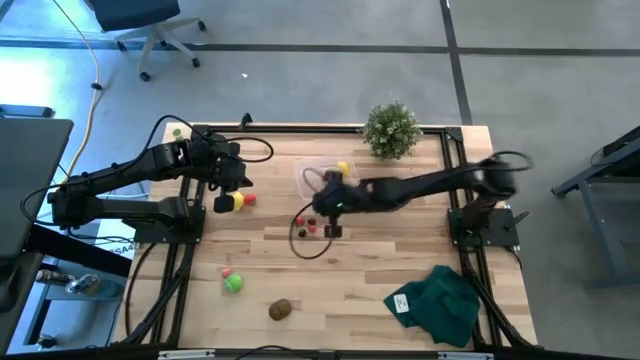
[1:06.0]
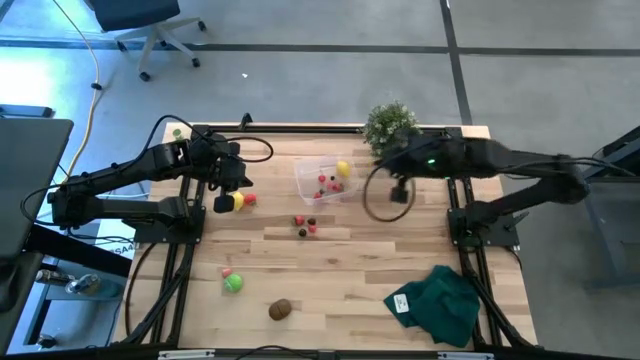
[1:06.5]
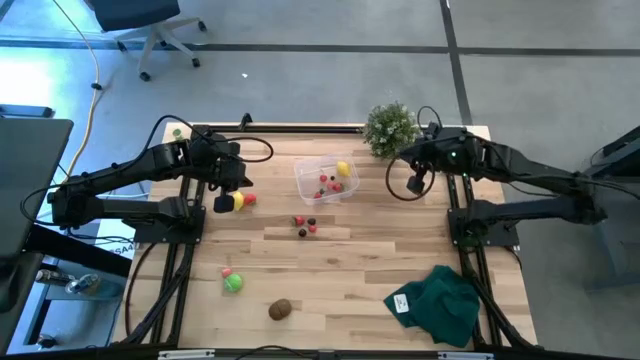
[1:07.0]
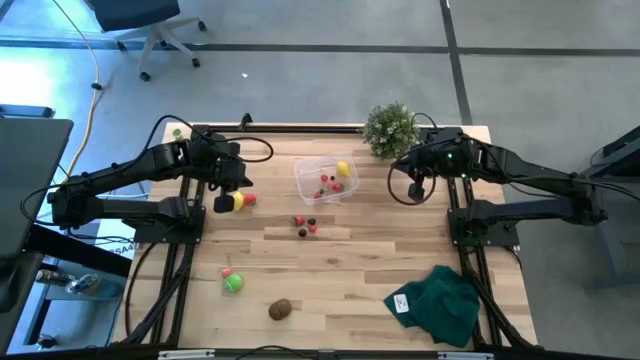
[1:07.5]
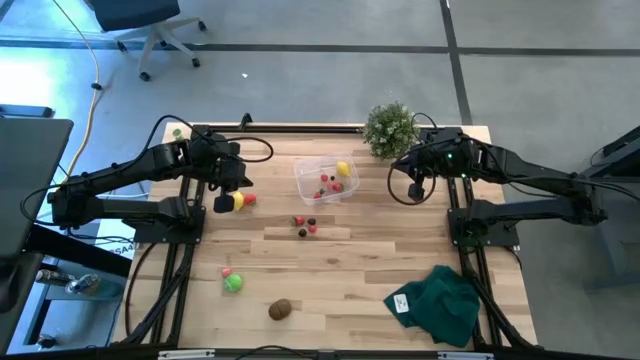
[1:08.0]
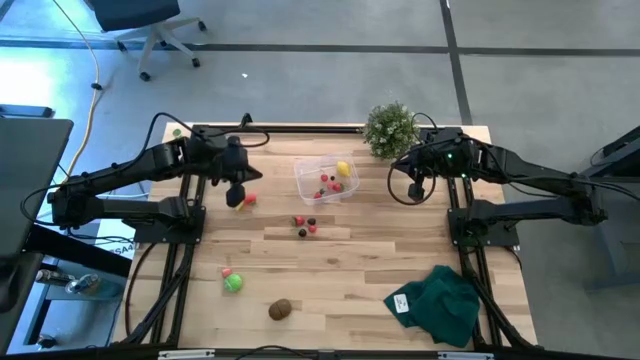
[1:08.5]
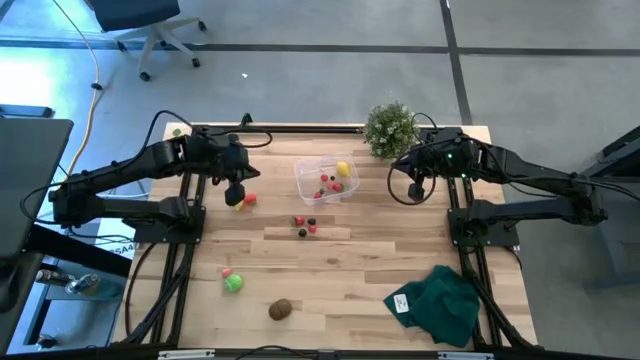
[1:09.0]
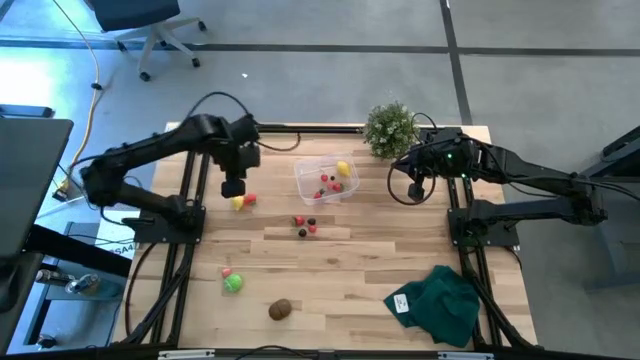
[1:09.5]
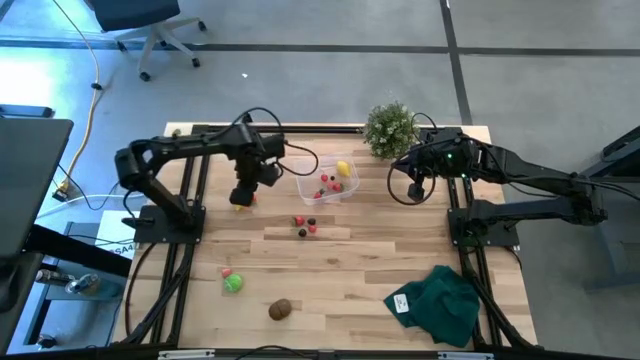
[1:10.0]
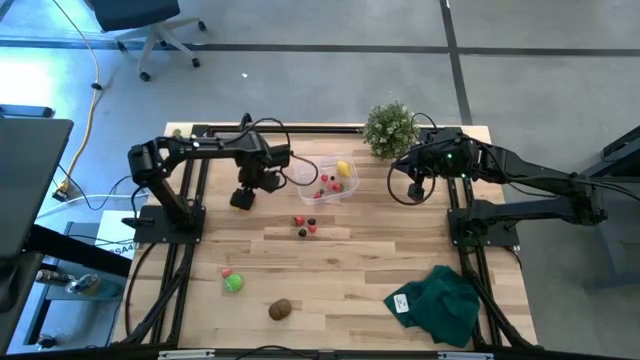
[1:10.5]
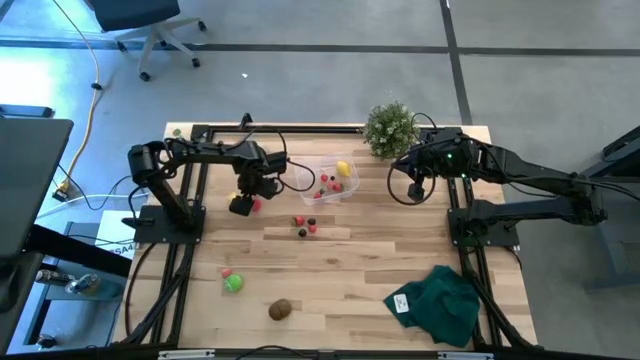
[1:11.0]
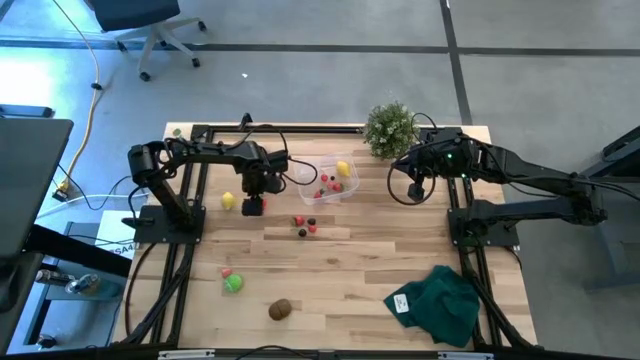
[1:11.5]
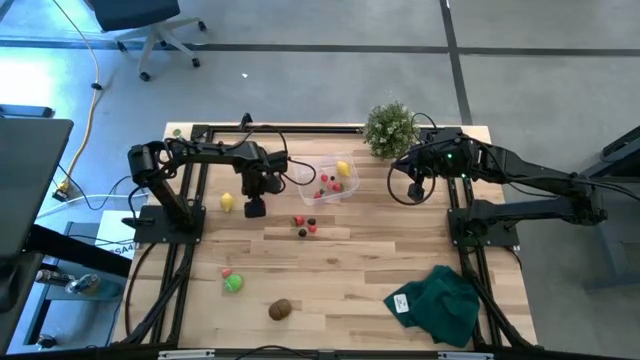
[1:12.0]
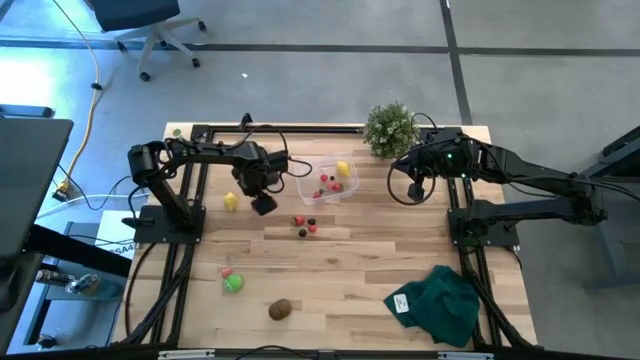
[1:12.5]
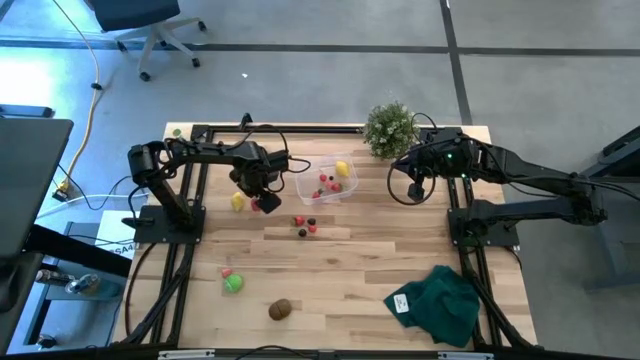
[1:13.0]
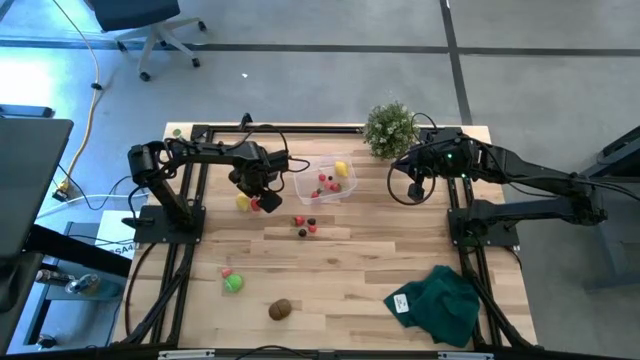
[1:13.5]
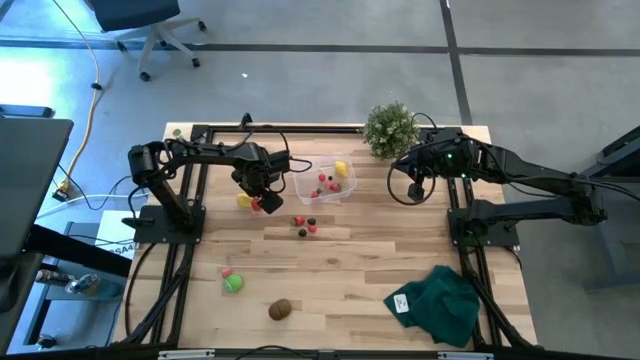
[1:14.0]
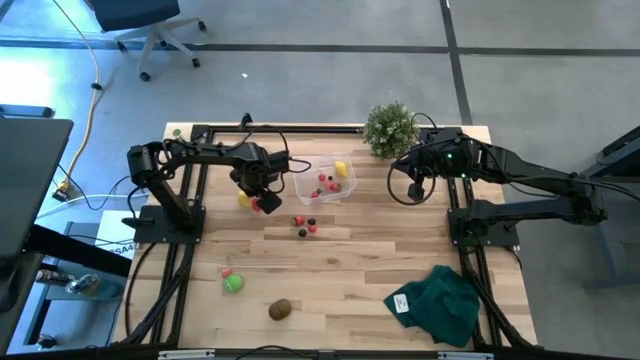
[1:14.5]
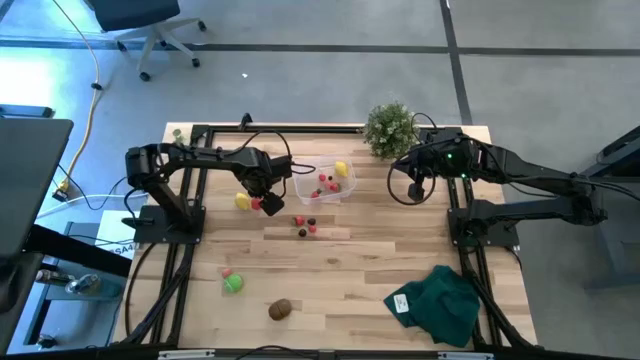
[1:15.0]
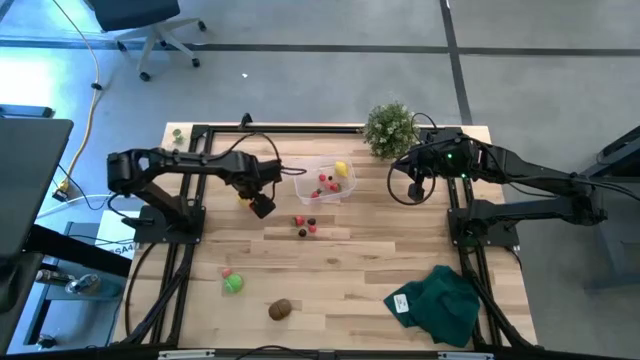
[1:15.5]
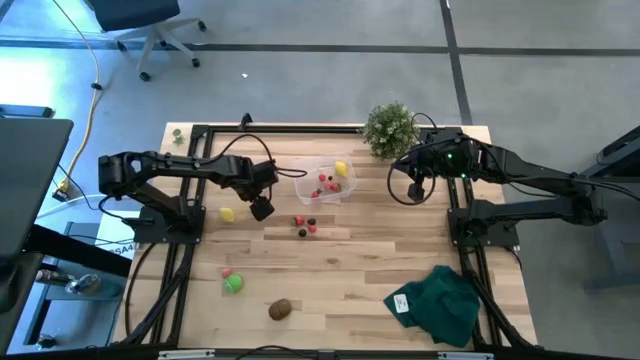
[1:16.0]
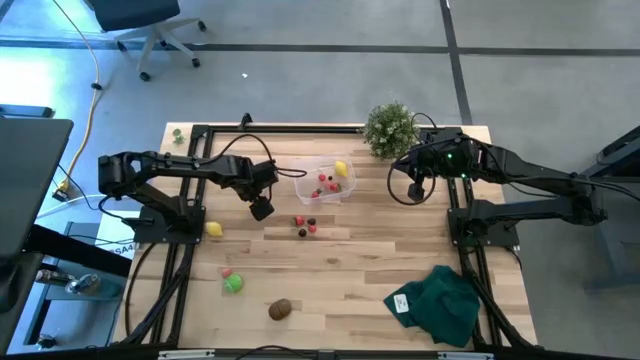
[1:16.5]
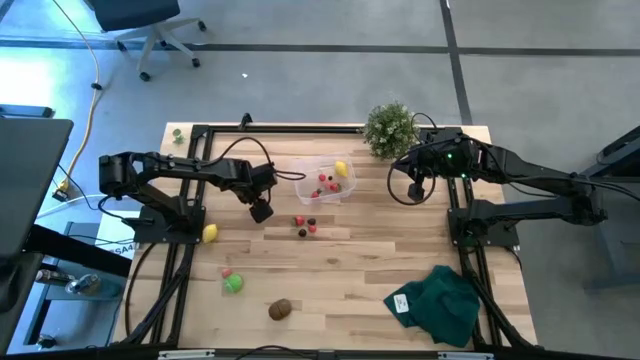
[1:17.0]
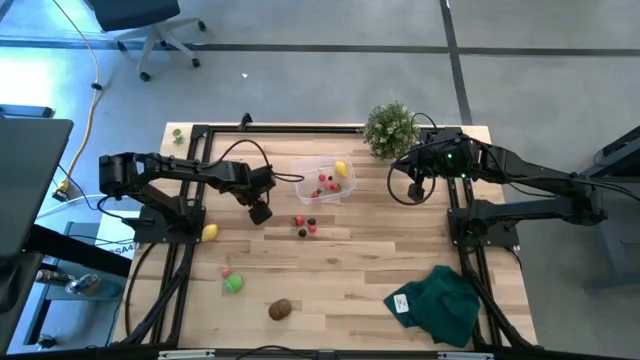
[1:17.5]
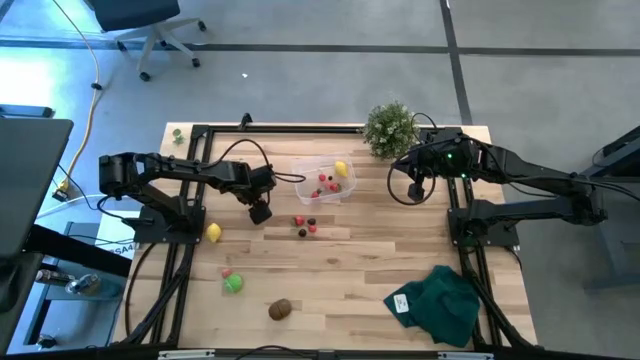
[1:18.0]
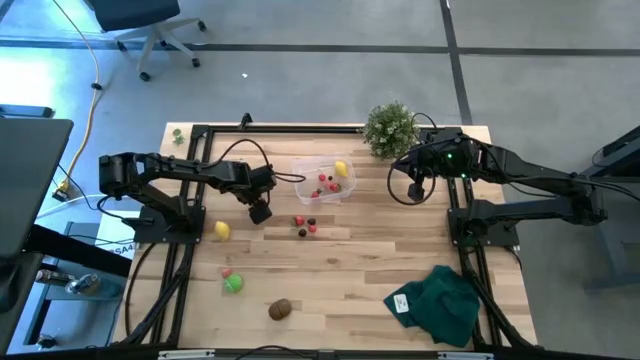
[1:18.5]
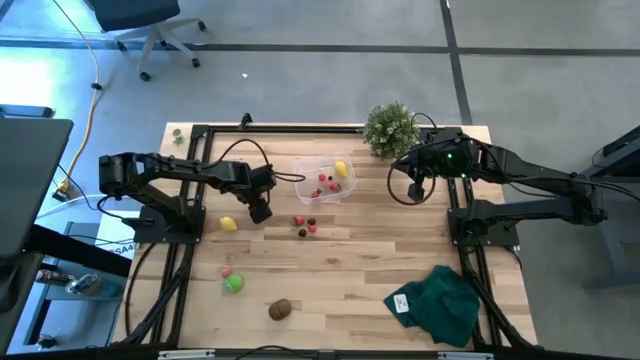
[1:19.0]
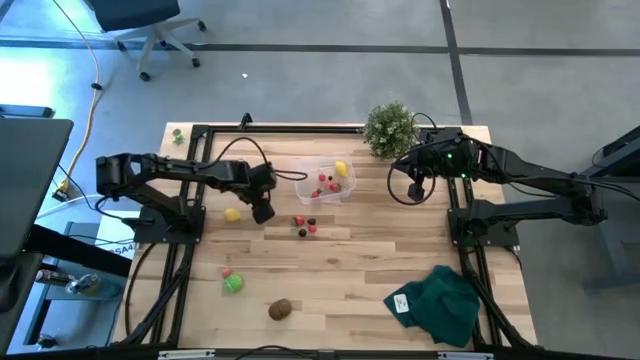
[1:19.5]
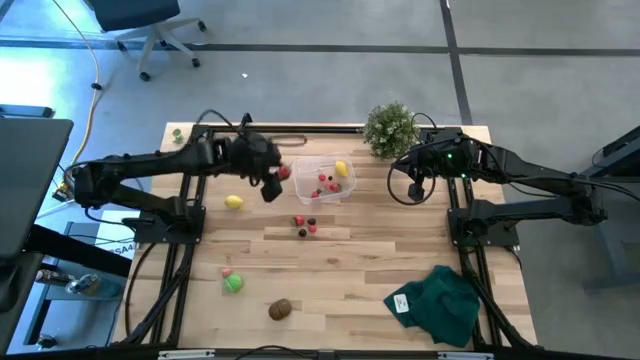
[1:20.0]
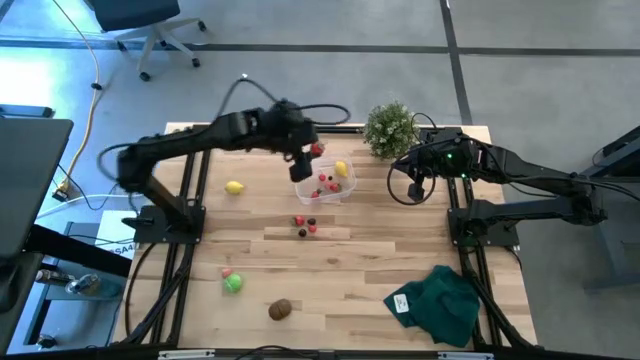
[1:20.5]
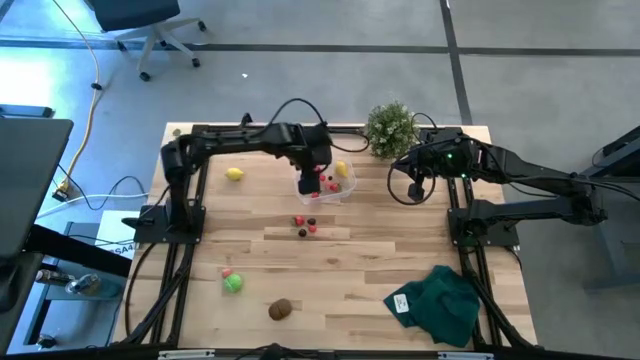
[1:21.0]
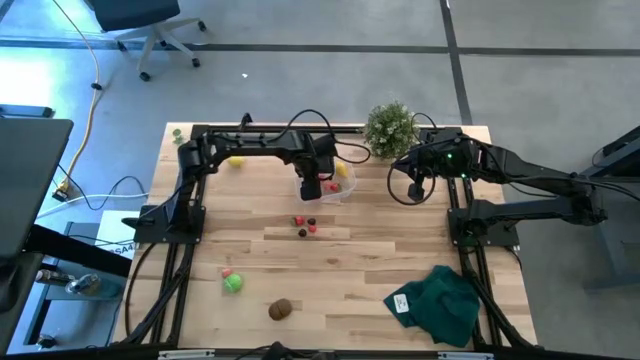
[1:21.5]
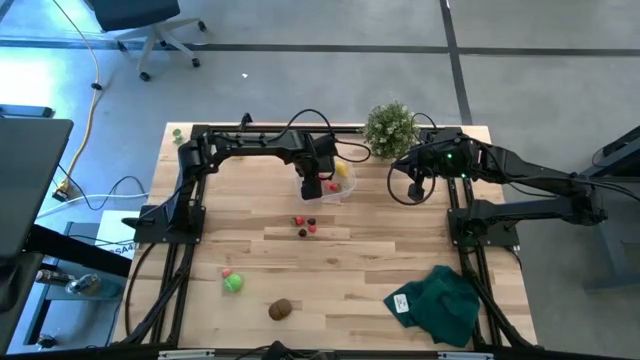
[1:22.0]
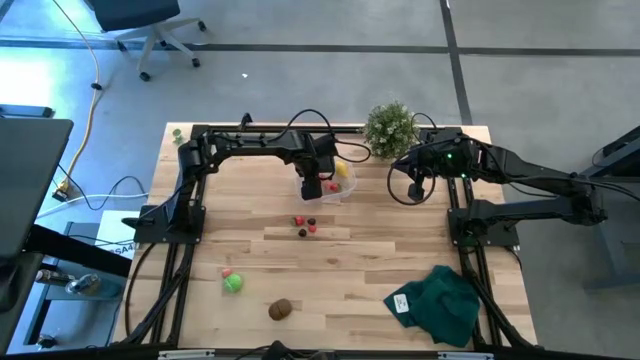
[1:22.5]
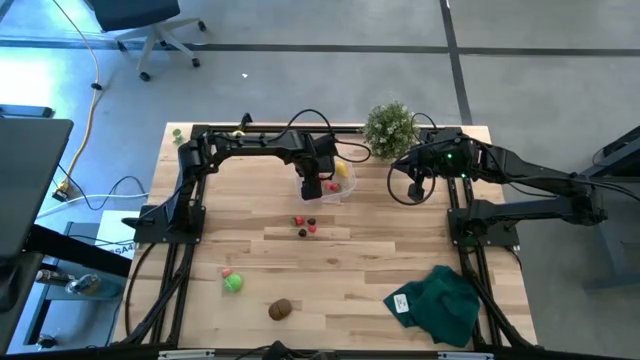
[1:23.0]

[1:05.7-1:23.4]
Task: Pick and placing Produce into tupperware
Put the red strawberry into the transparent bin

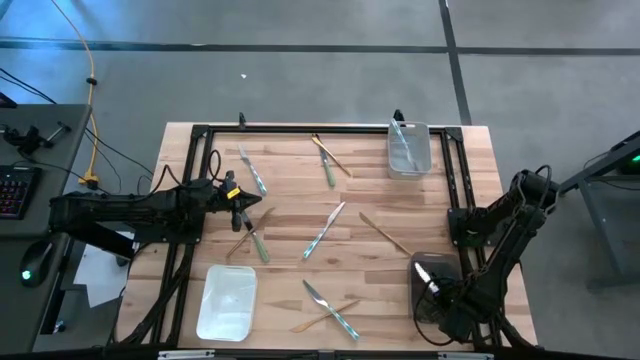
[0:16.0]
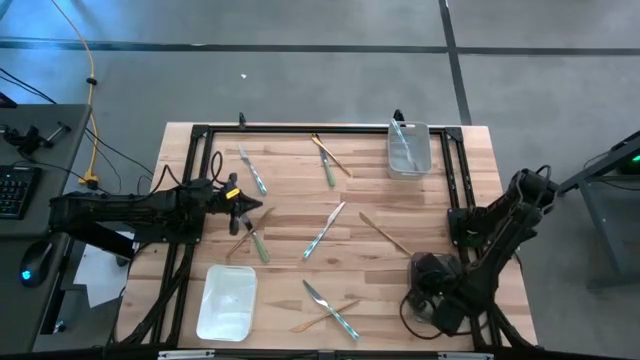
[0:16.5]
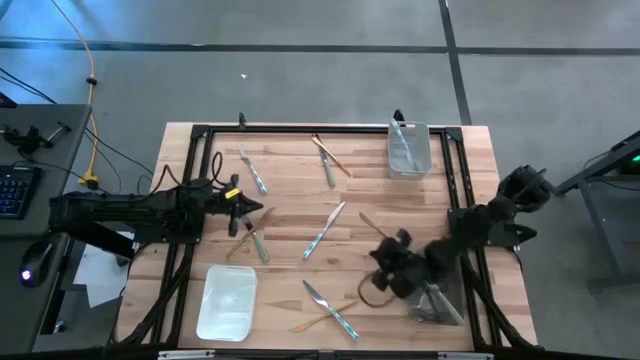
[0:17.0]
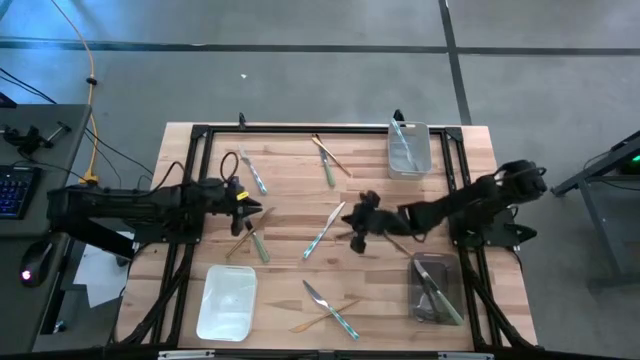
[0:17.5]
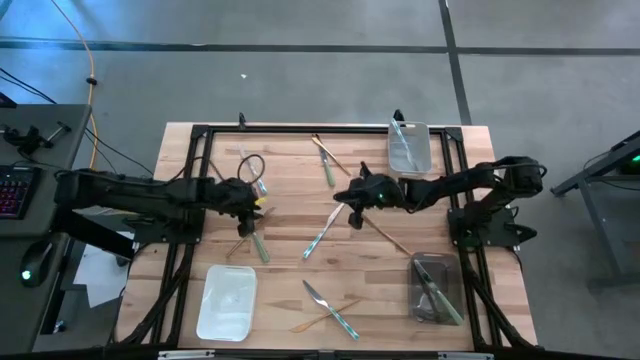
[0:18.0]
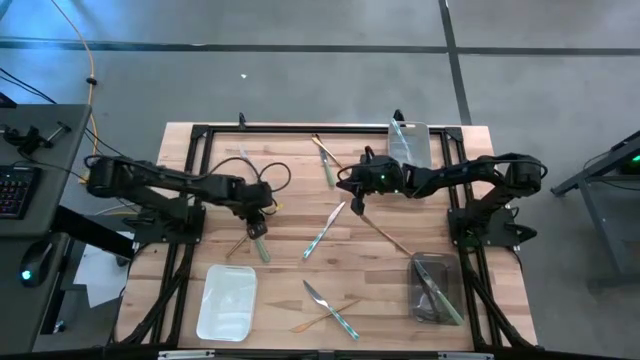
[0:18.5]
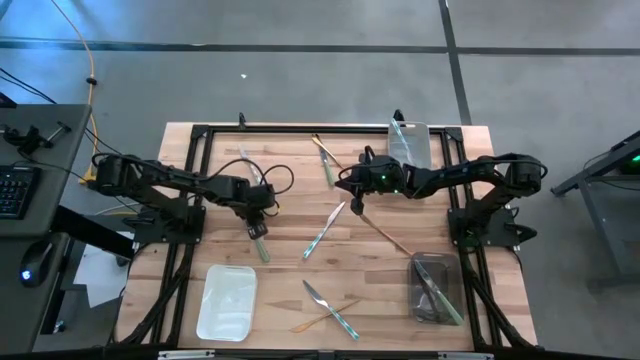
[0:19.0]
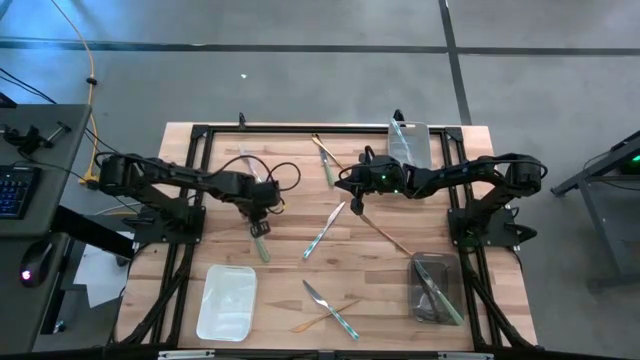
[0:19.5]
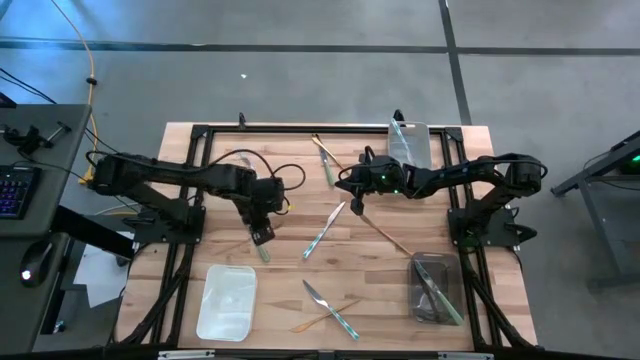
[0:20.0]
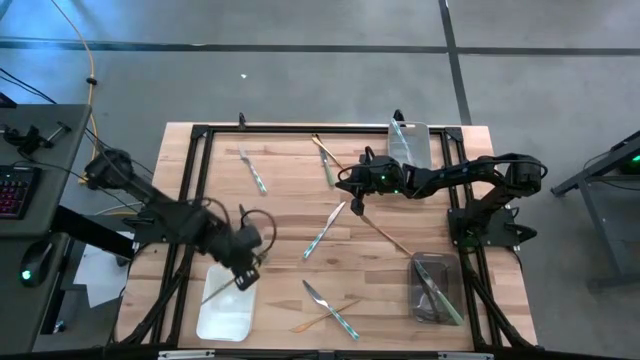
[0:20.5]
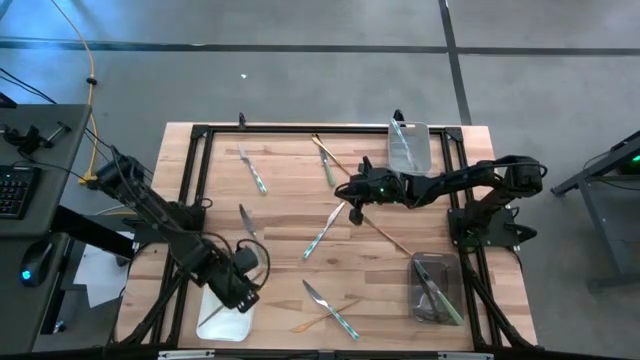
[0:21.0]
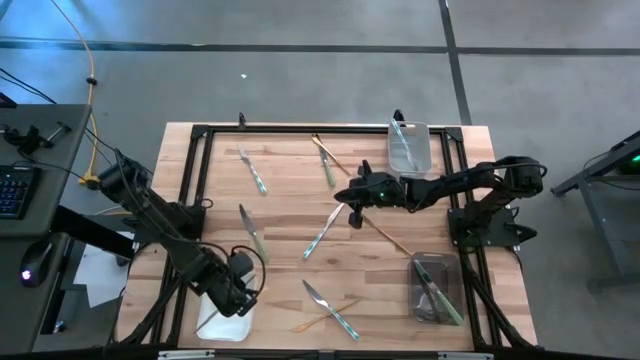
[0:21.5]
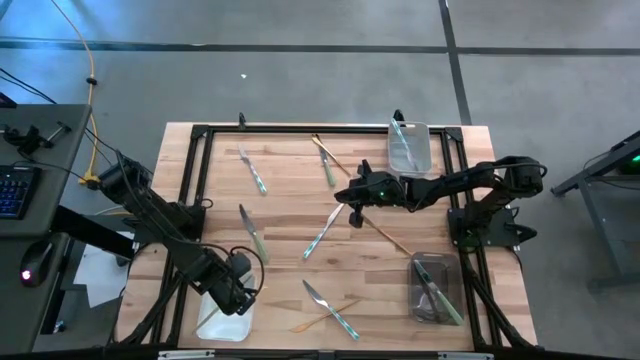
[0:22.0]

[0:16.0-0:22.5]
Task: Sort silverware by color (type)
Put the gold table knife into the white bin
